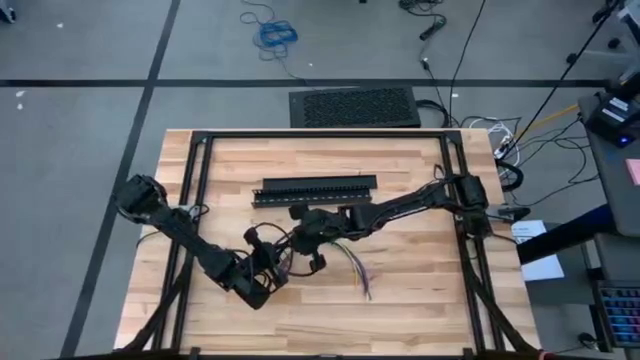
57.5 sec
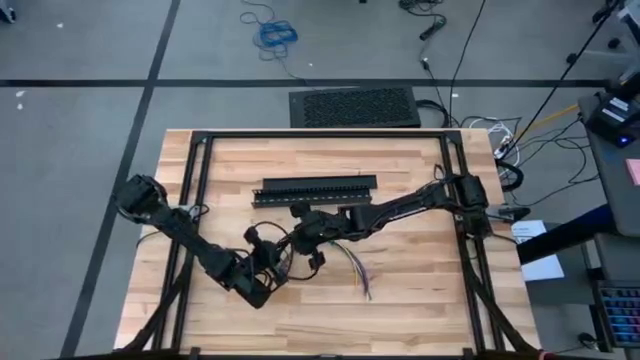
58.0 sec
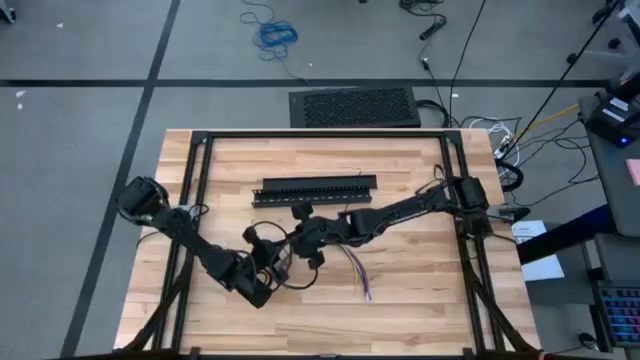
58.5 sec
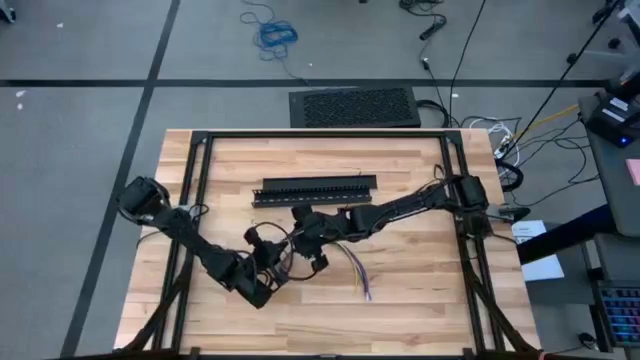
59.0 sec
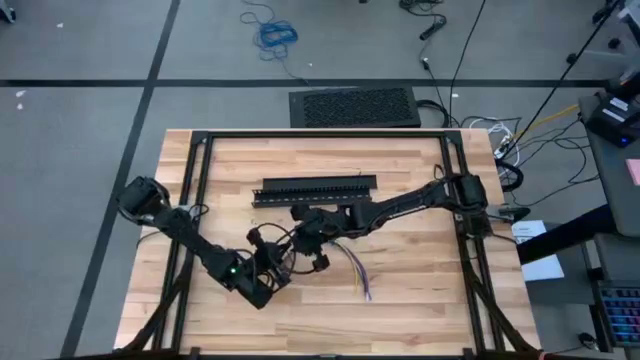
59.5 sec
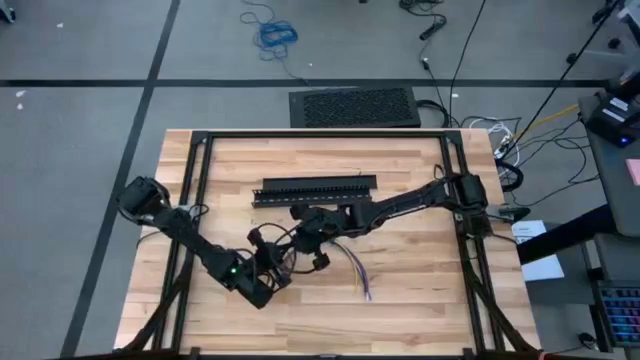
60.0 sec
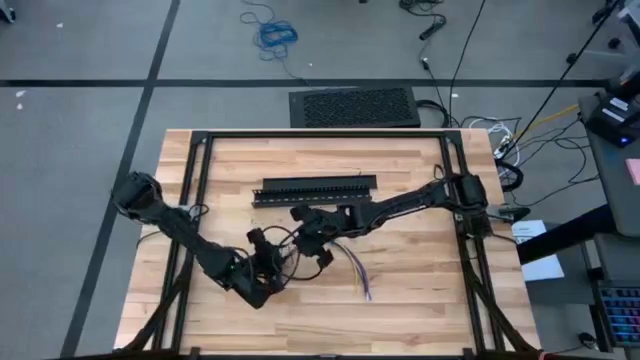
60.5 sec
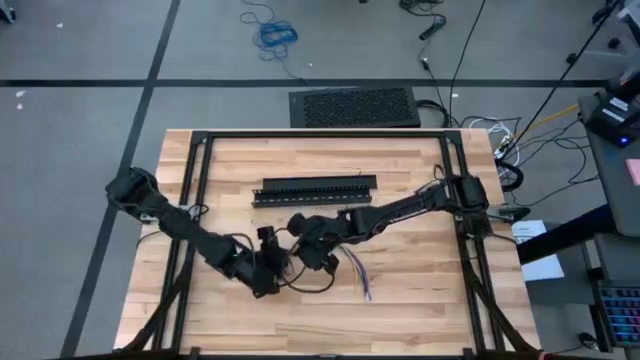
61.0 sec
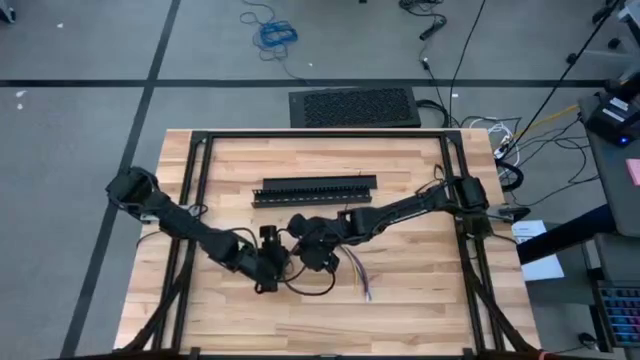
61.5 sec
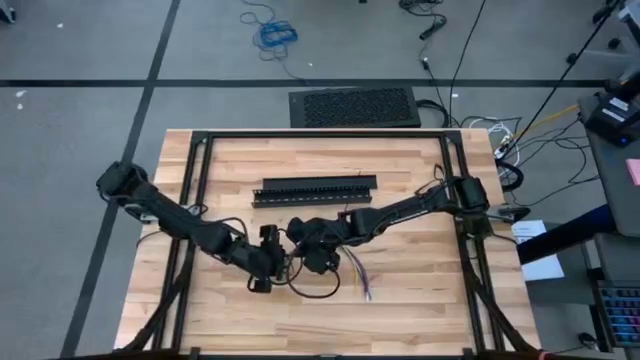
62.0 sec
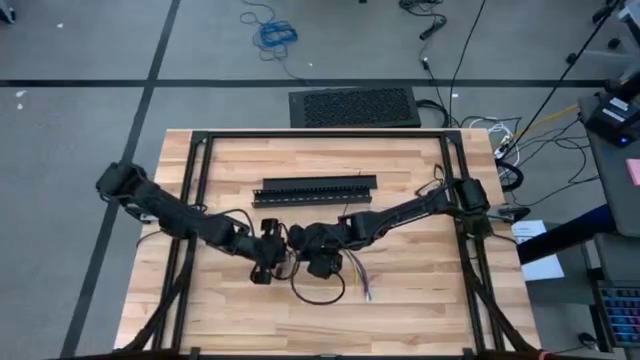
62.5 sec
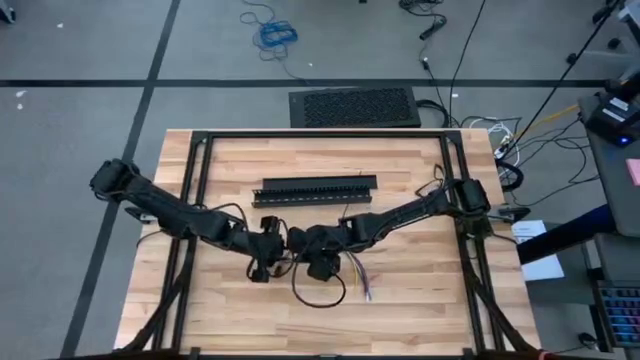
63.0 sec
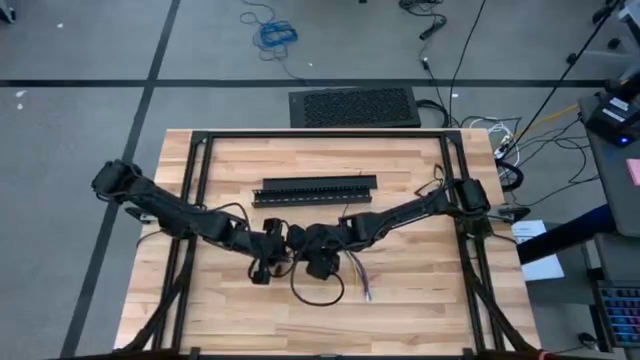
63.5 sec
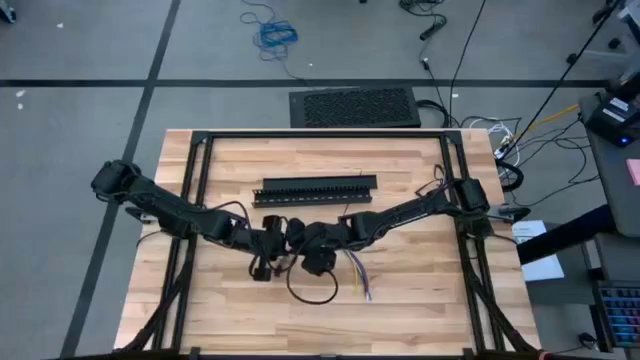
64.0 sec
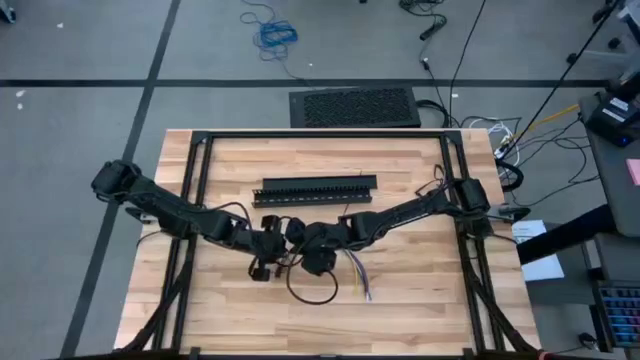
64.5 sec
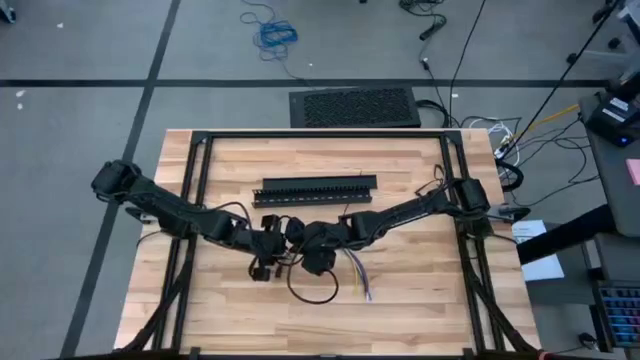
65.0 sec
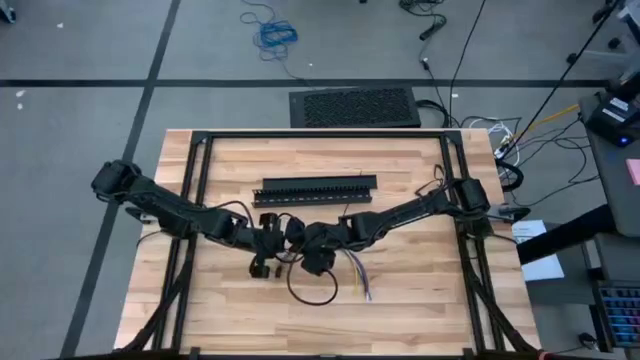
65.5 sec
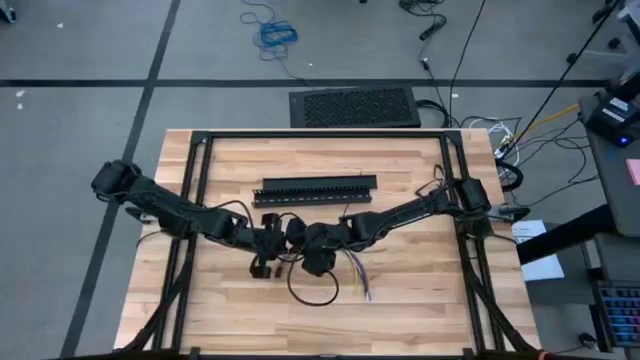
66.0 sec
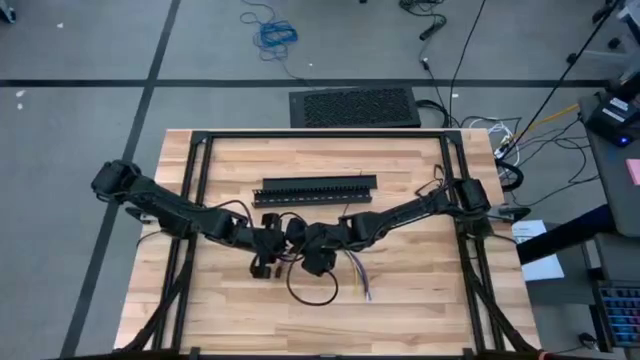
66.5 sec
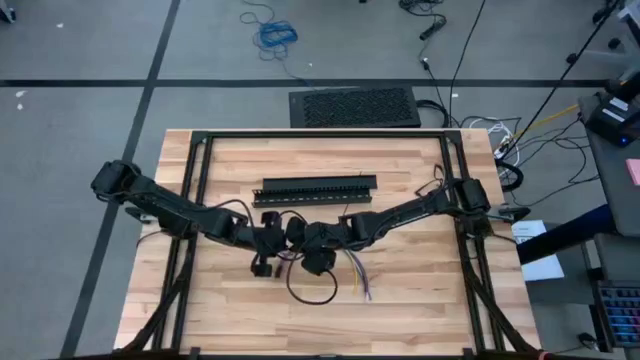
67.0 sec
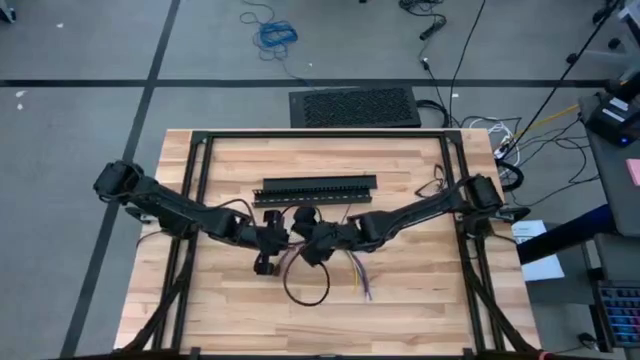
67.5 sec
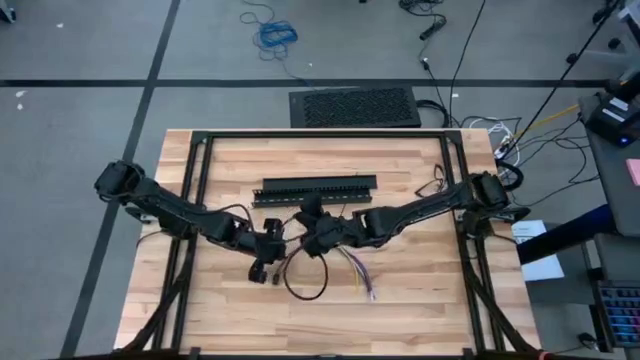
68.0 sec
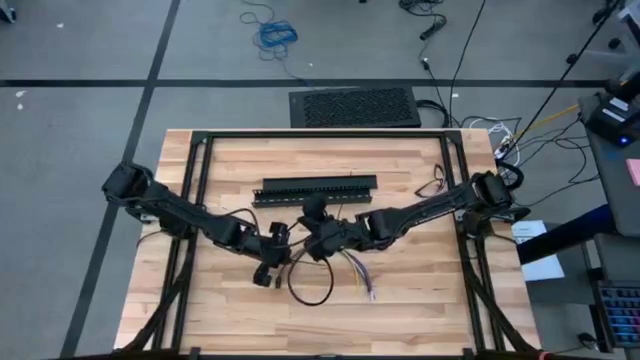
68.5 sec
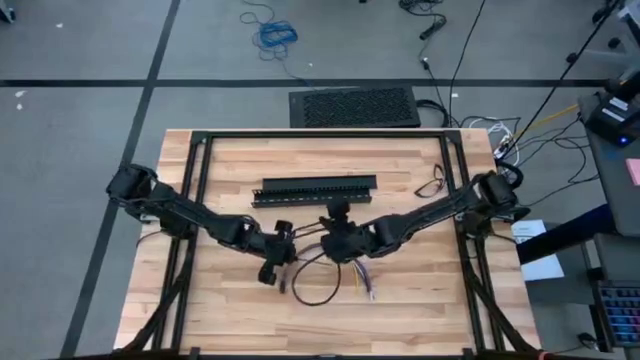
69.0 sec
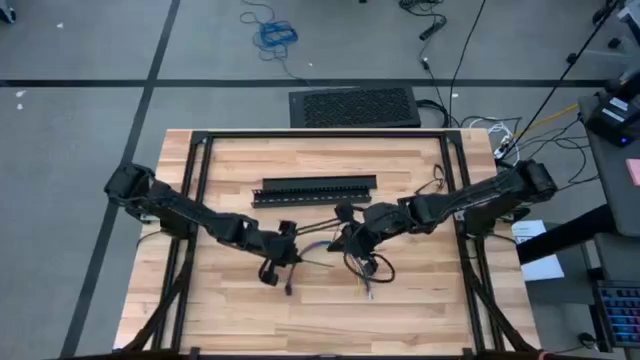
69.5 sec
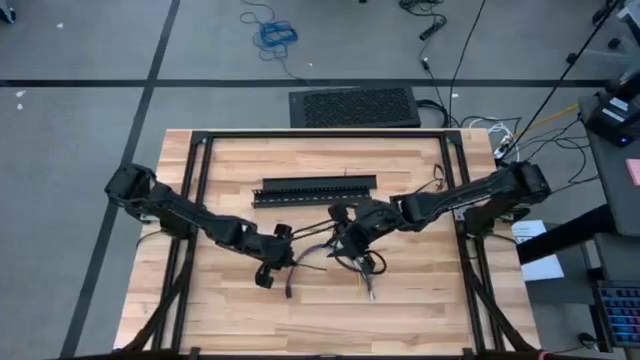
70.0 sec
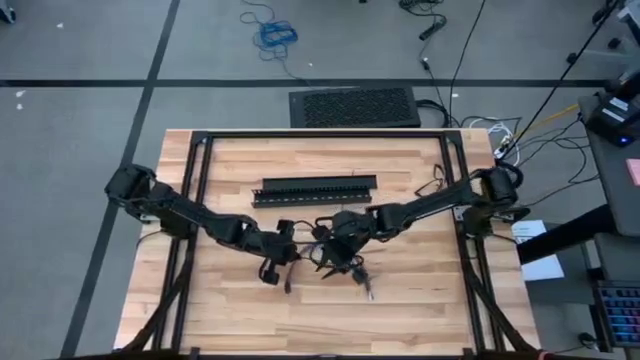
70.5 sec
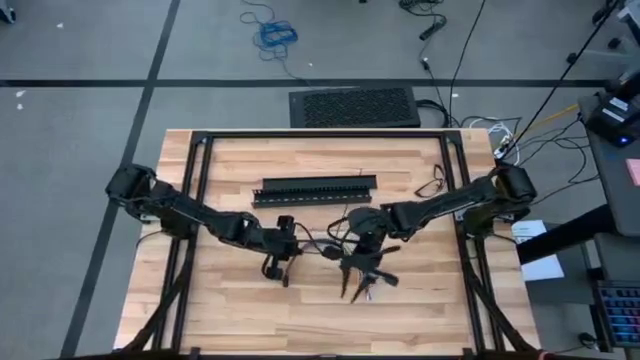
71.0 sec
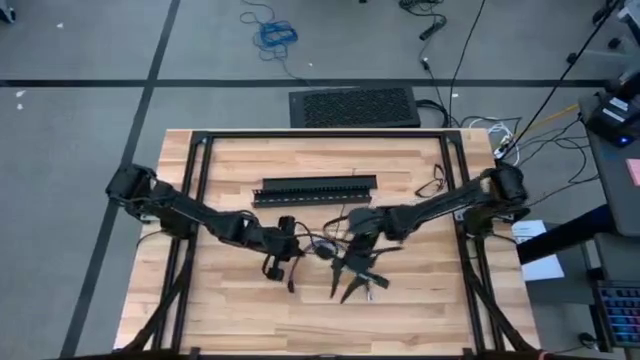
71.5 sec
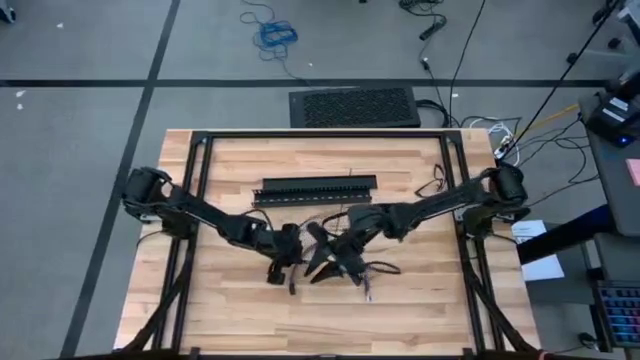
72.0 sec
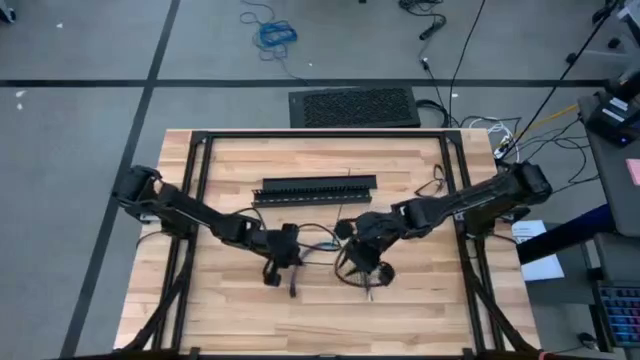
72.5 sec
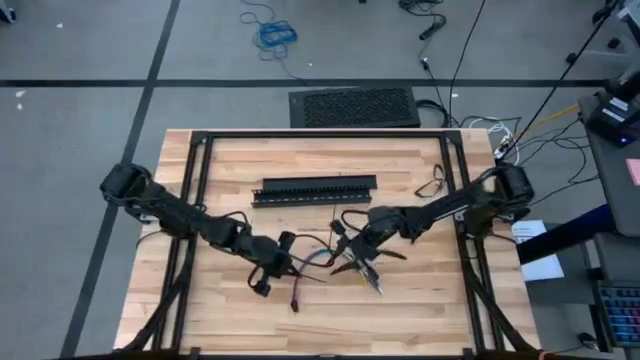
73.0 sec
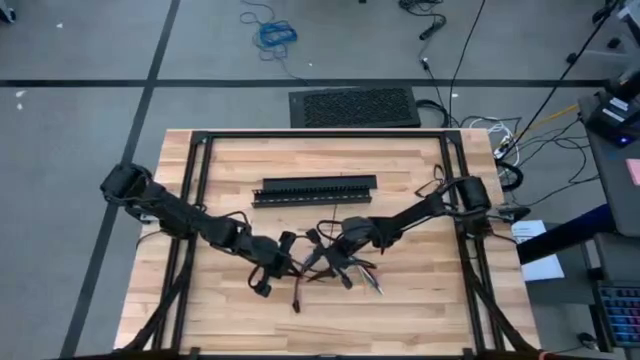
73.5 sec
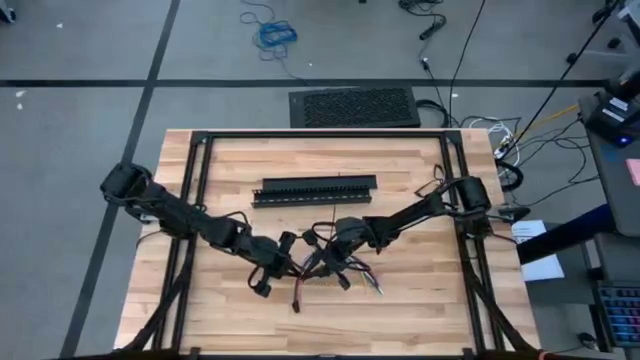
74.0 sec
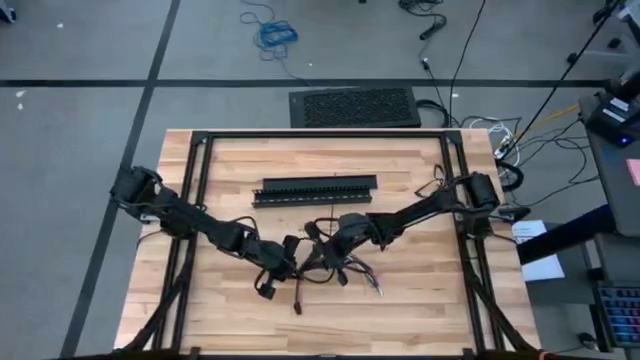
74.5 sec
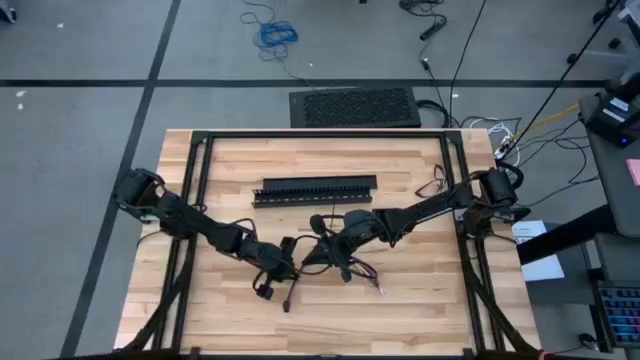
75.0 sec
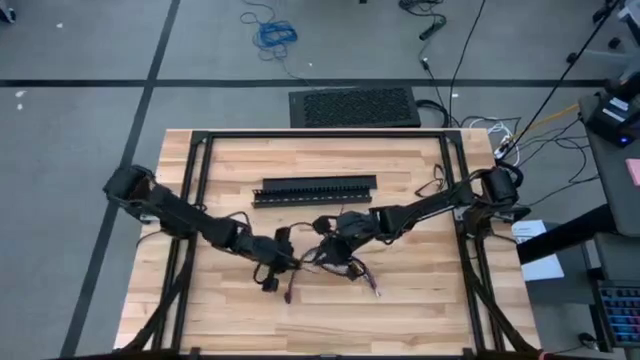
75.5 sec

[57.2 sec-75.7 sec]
Task: Ziptie cables
Wrap the cables together using a zip tie

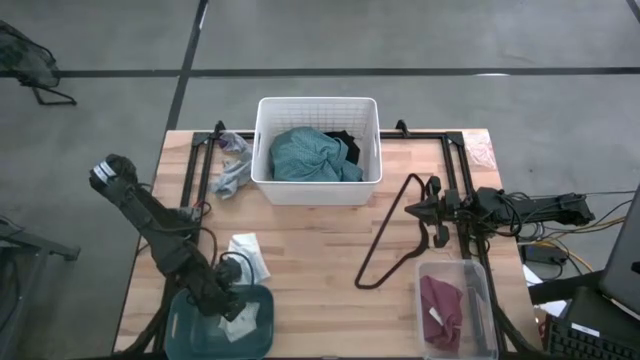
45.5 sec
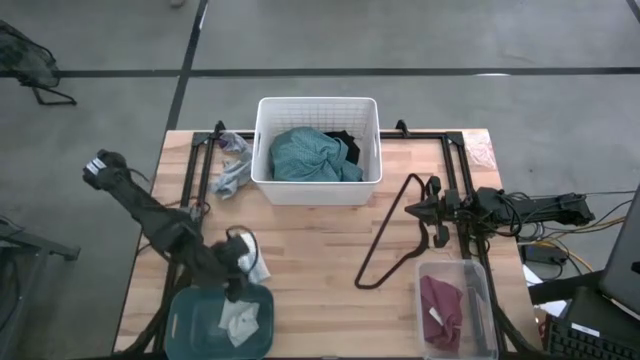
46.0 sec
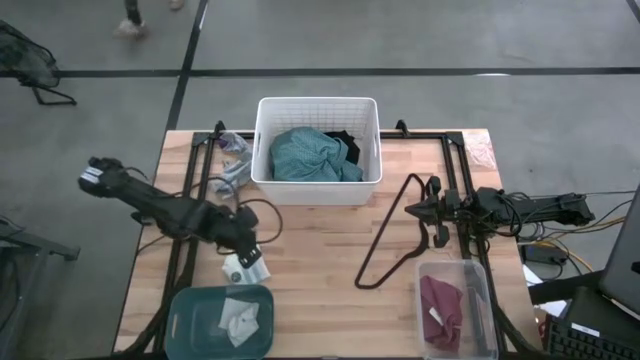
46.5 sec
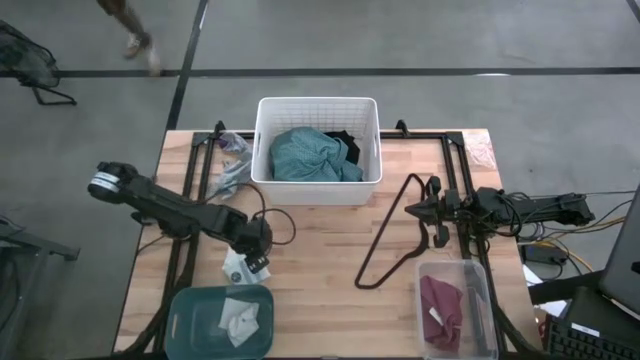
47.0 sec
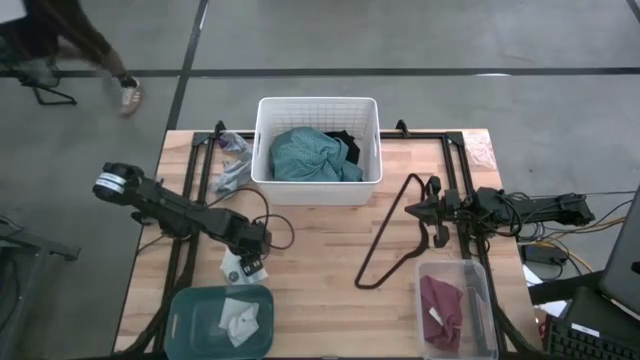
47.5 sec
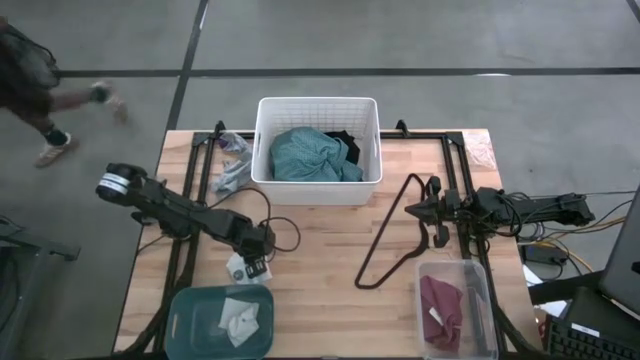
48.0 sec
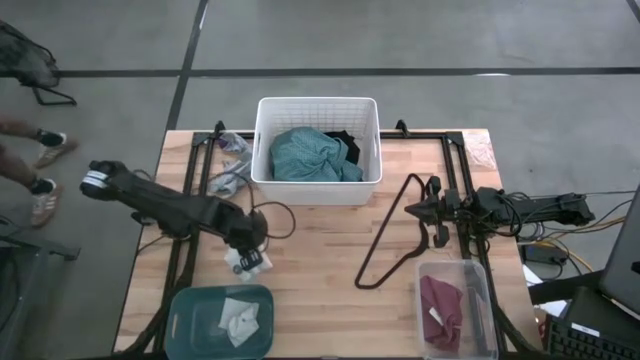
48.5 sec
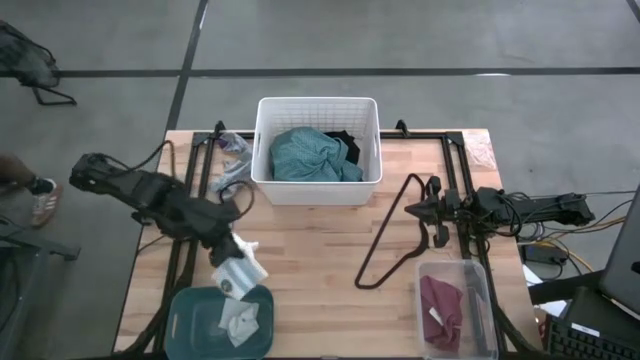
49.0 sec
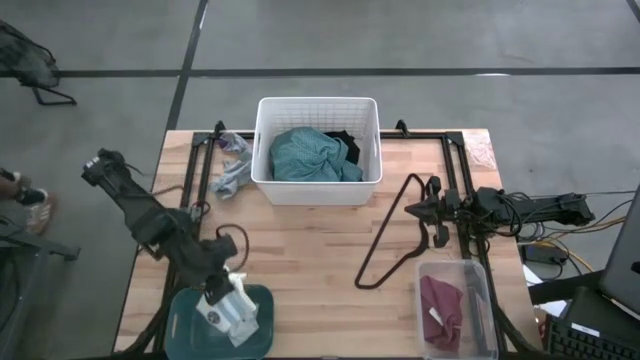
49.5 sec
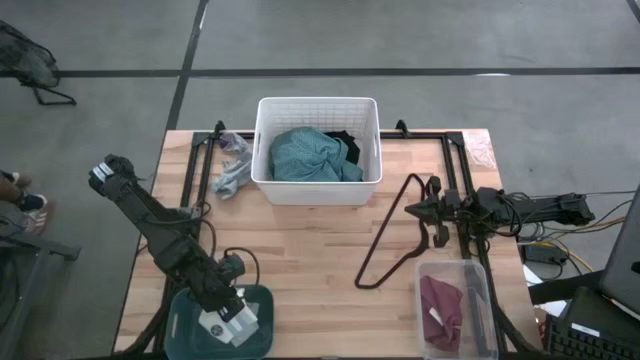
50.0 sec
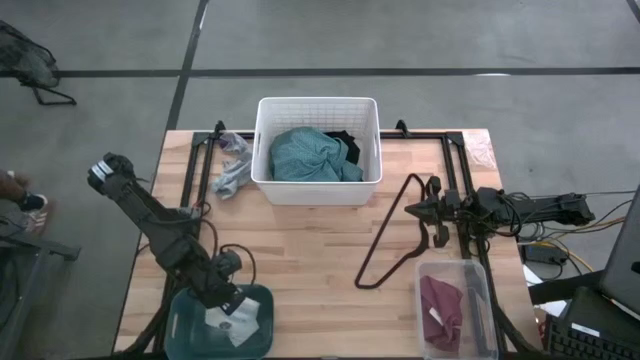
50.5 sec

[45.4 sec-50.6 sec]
Task: Pick & Place Cloths
Put the white and blue sock into the green bin
